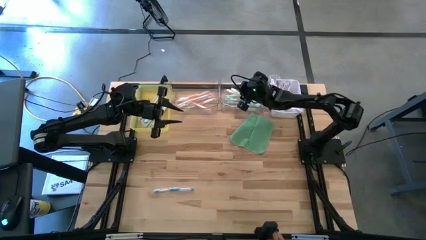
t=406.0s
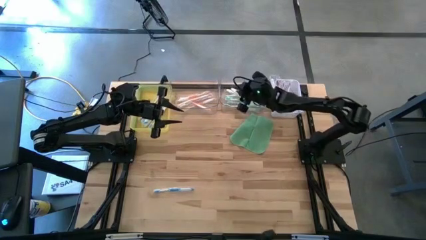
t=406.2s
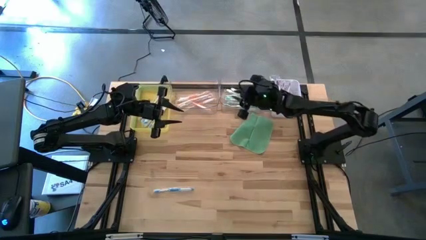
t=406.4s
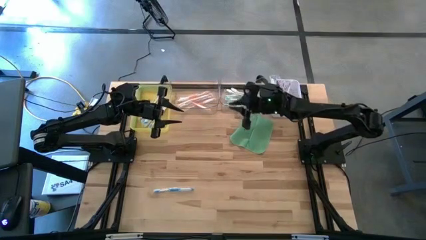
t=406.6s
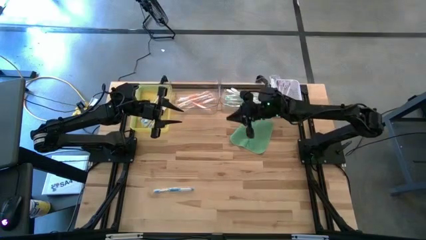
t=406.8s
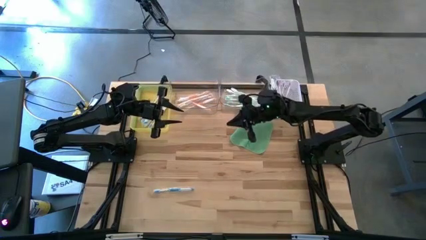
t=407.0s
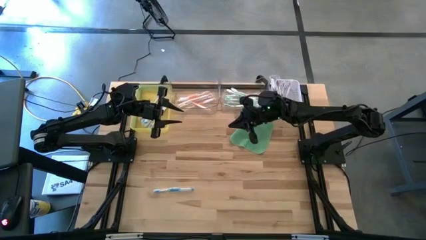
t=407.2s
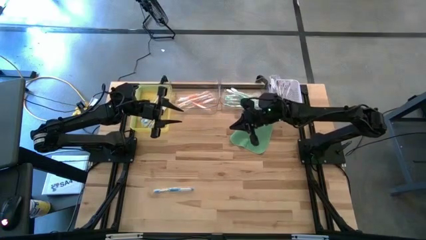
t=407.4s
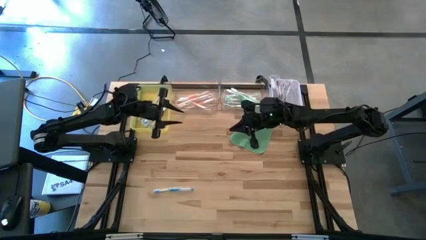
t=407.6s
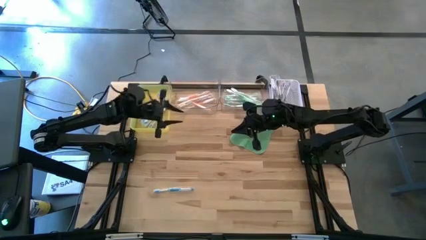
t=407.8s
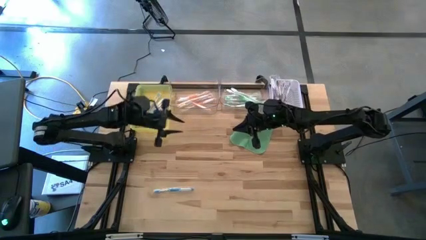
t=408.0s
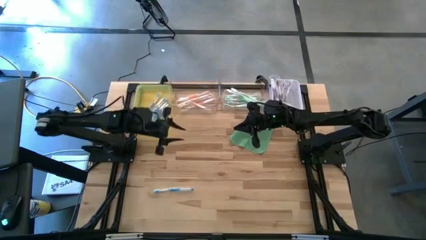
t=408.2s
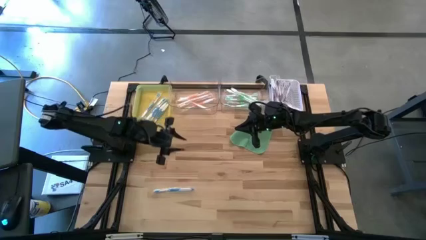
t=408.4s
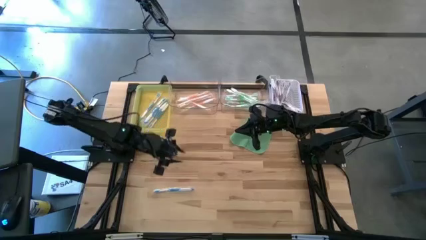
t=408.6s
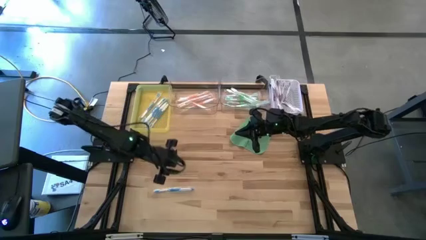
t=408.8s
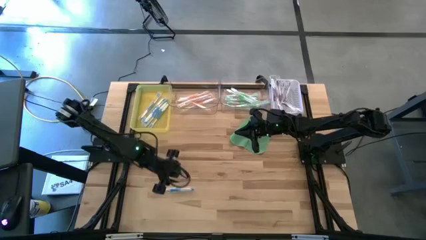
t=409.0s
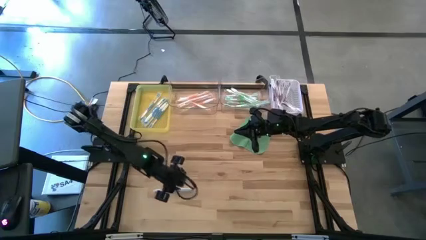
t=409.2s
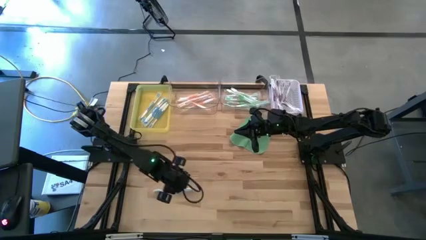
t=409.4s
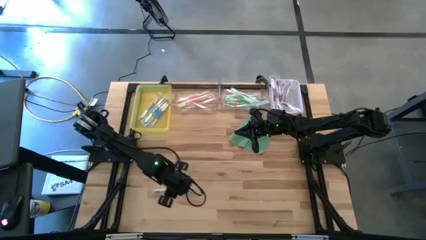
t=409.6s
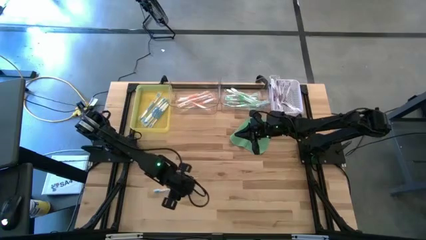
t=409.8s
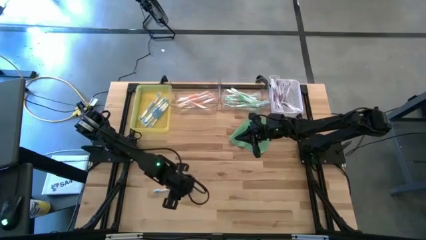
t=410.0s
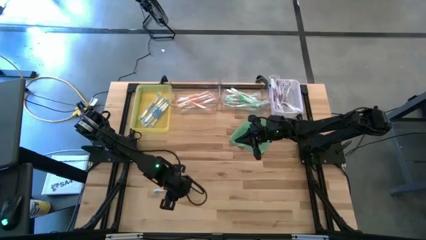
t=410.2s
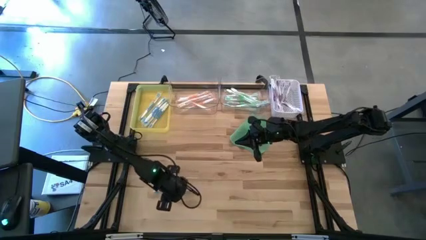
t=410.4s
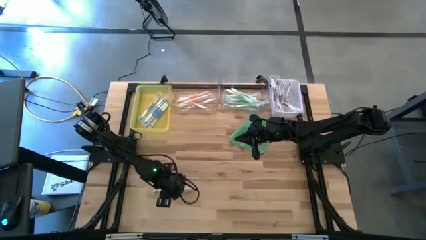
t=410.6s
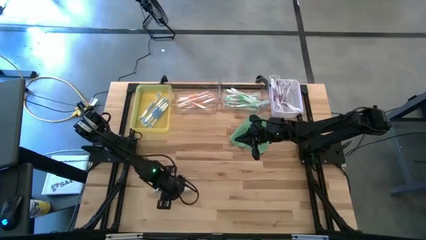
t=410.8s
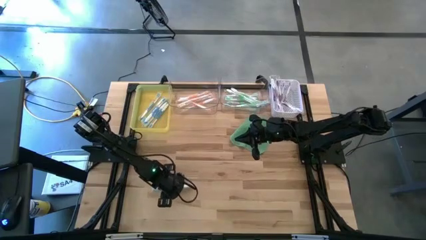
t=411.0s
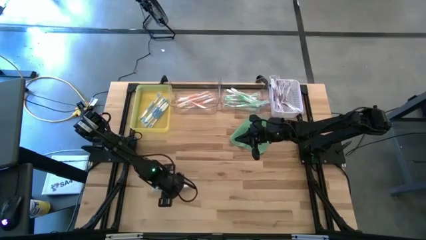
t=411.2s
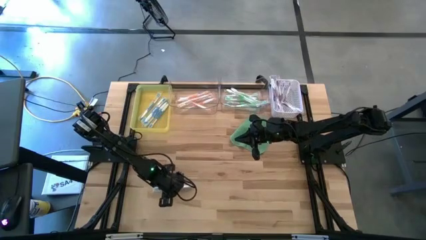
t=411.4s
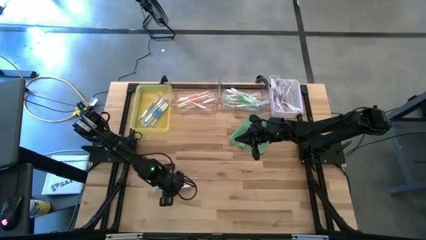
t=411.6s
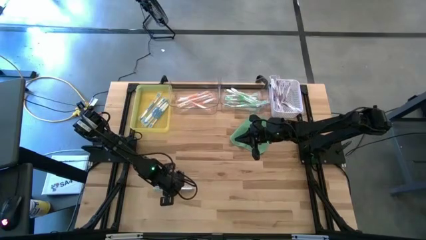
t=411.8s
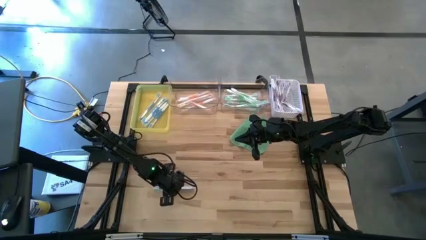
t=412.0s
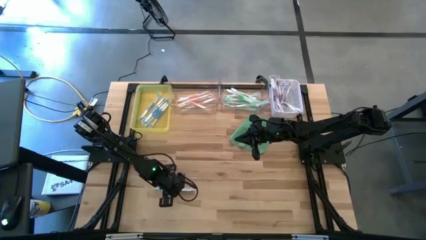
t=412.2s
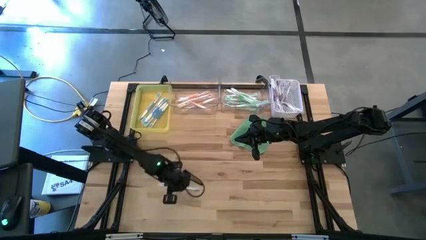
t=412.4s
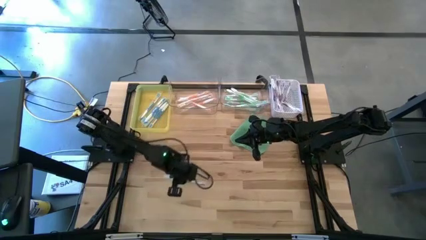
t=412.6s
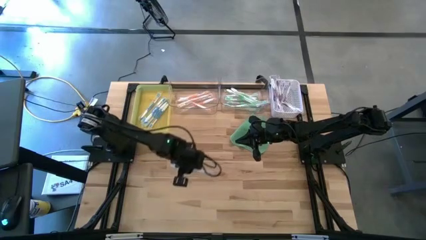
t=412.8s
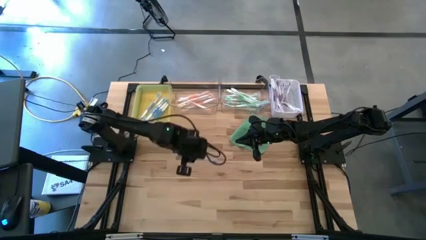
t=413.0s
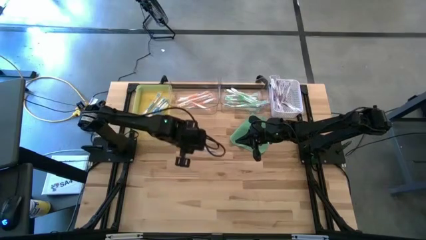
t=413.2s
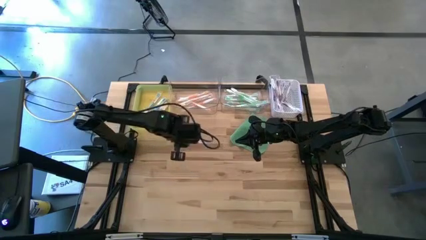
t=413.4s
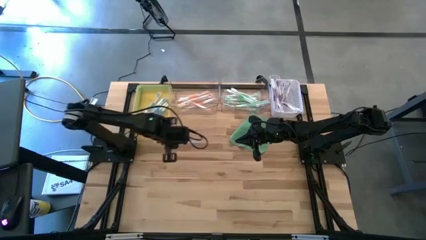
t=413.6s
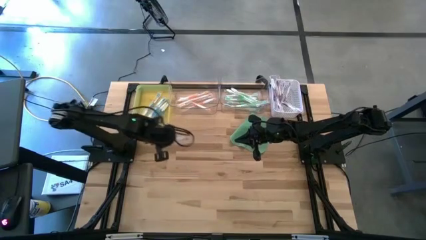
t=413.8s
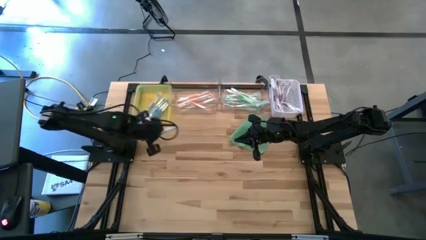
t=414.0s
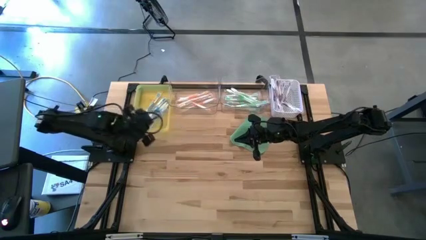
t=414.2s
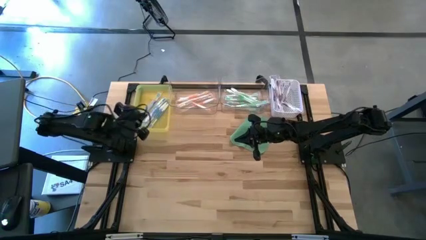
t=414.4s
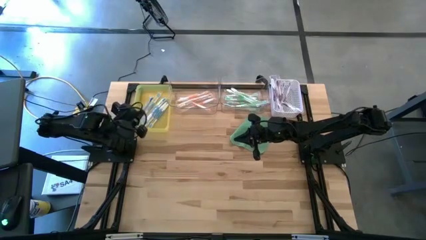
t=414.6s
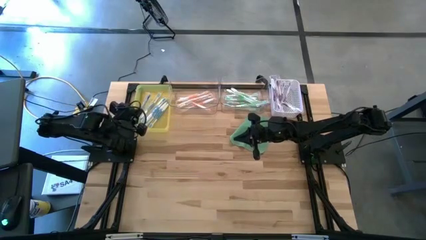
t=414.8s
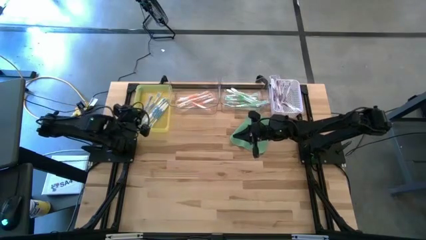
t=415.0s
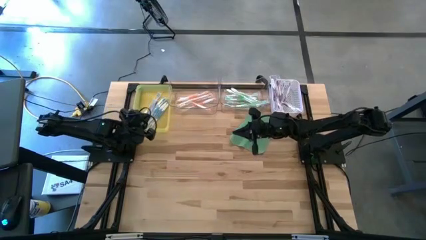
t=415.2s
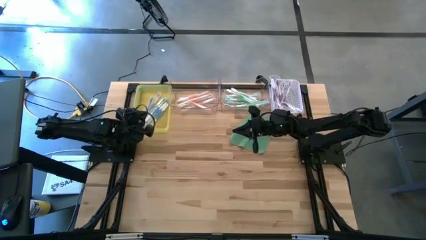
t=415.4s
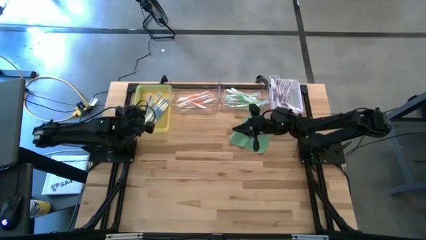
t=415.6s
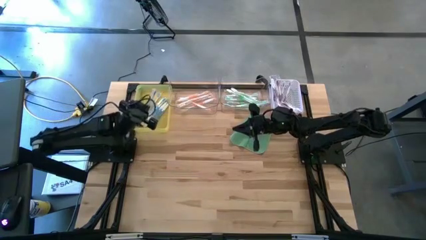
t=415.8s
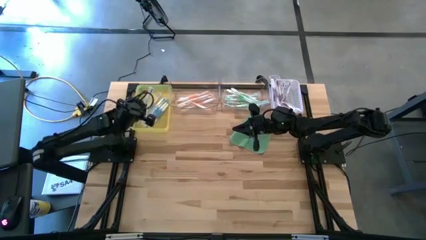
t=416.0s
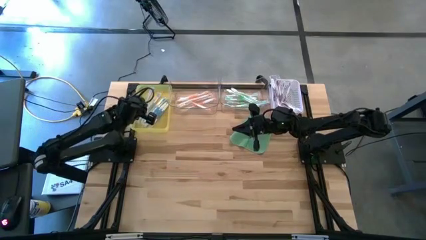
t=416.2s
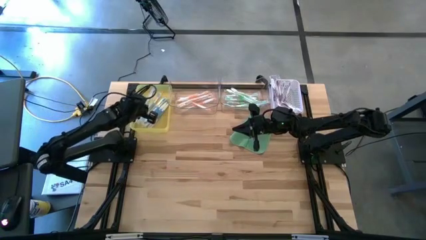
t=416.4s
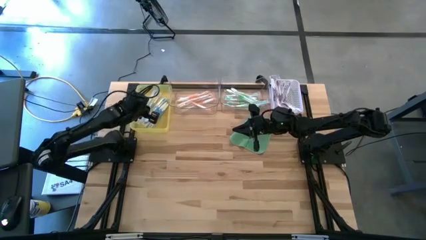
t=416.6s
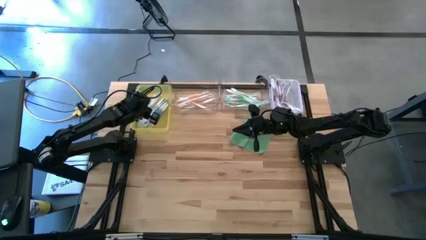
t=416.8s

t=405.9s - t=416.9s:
Task: Pick & Place Toothbrushes
Put the blue toothbrush into the yellow bin

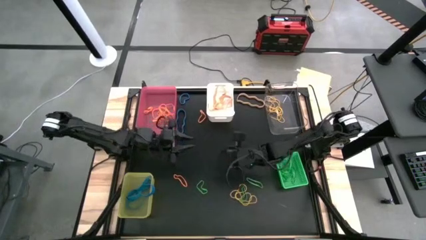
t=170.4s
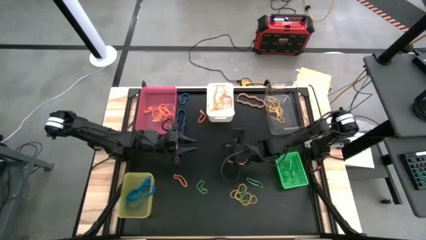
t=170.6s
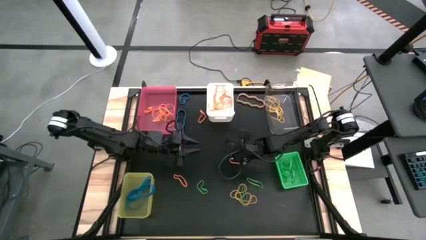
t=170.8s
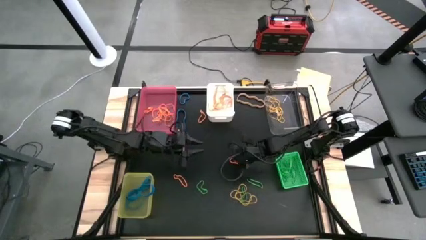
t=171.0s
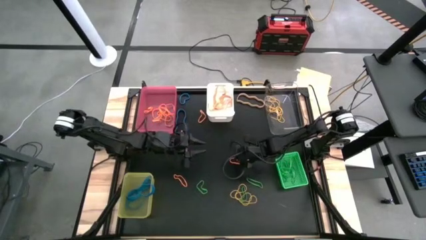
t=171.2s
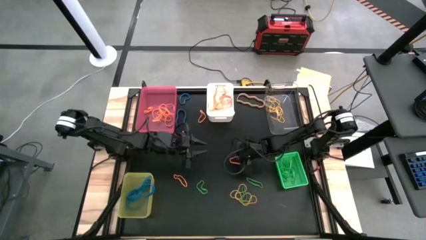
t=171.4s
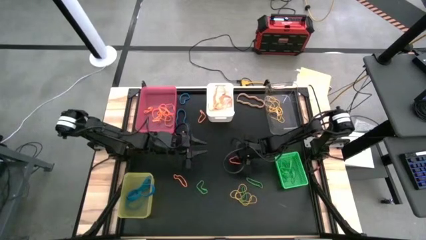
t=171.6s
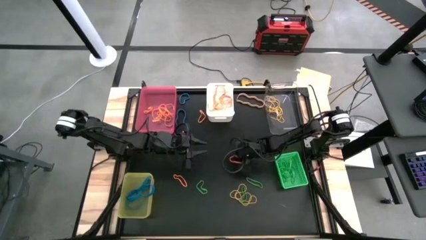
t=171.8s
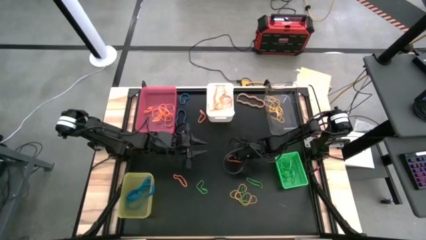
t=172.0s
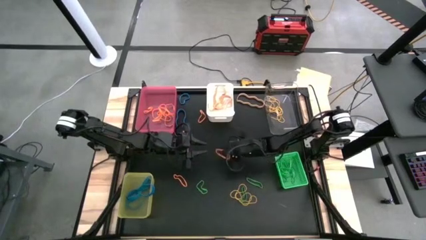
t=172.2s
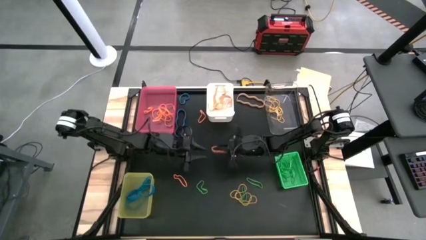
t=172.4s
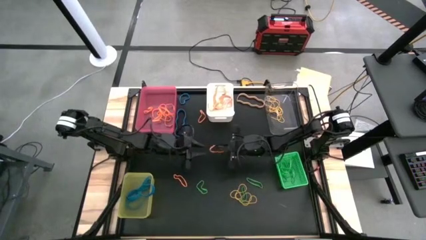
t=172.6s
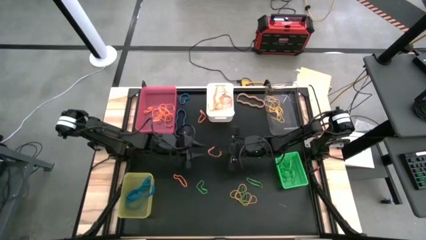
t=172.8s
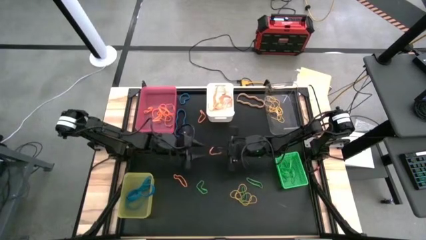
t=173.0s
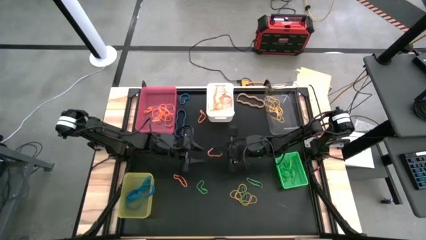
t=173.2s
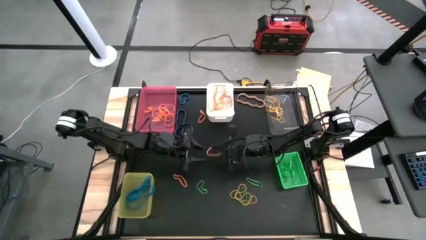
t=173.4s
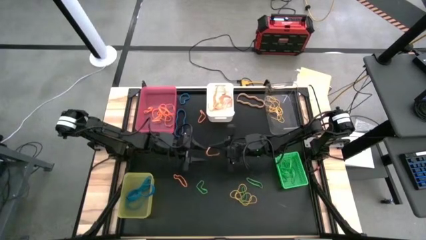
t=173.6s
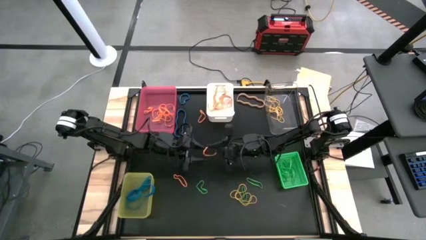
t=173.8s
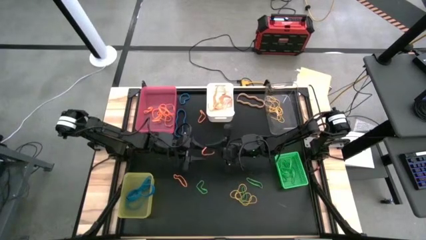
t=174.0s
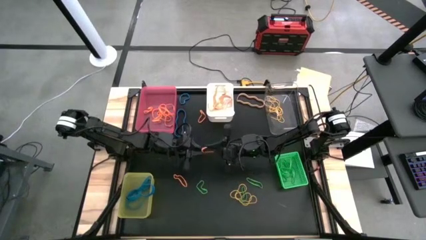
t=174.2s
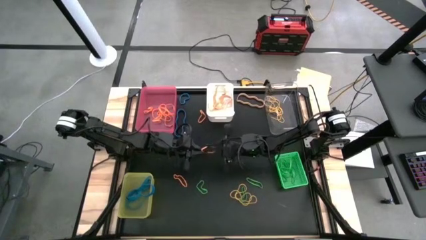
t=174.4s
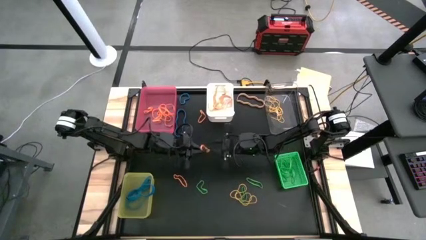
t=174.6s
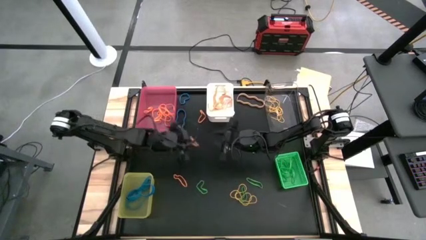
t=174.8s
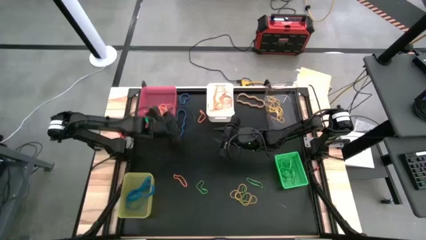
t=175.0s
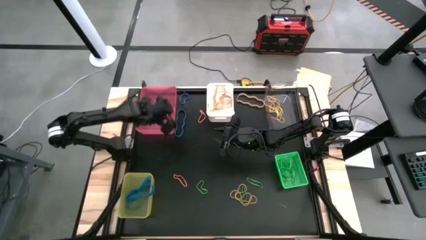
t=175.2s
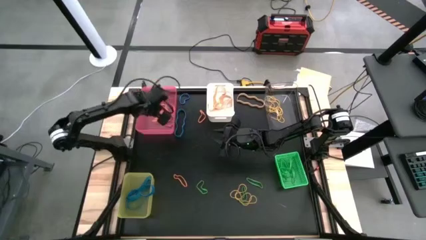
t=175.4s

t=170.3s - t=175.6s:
Task: Sort rubber bands into baskets
Put the orange rubber band into the pink bin
